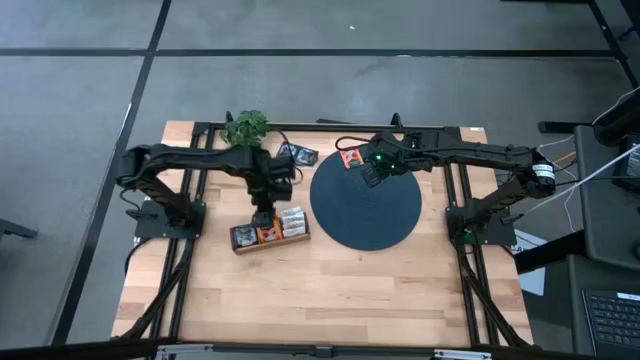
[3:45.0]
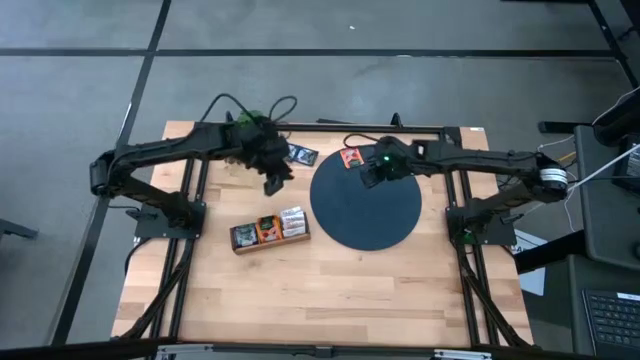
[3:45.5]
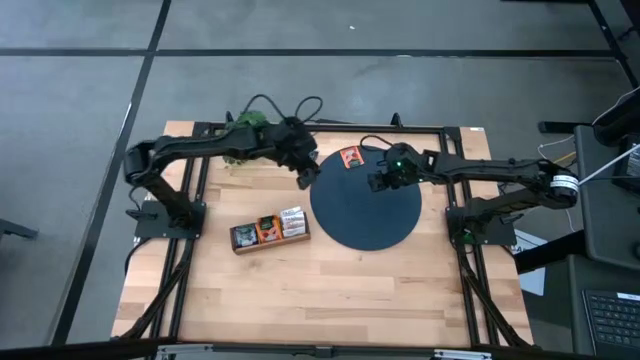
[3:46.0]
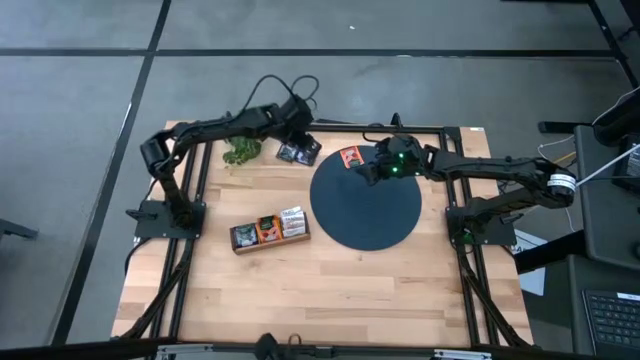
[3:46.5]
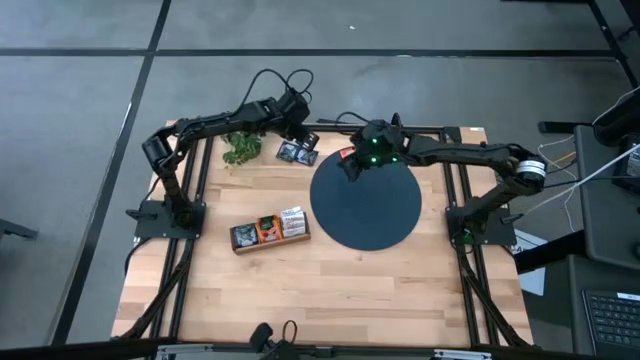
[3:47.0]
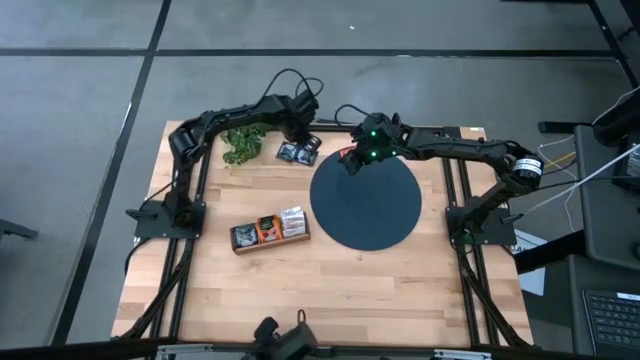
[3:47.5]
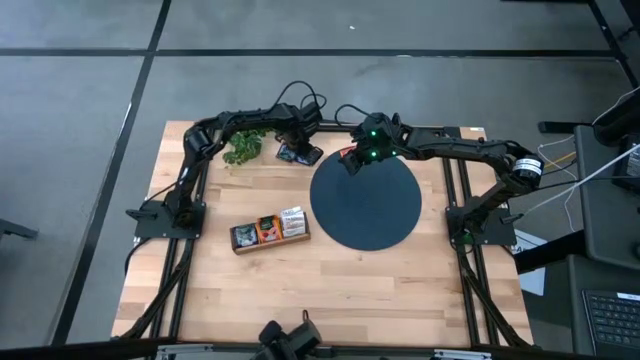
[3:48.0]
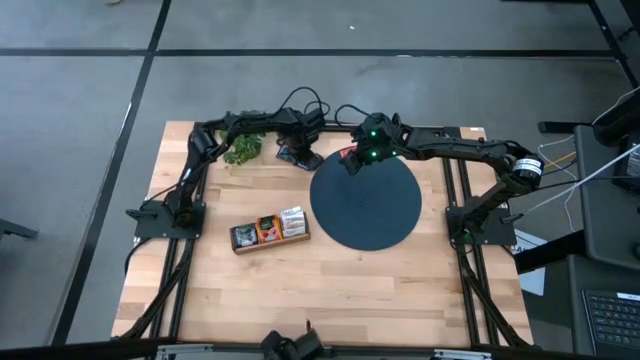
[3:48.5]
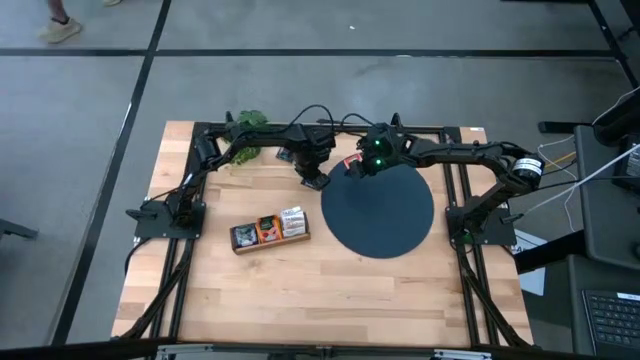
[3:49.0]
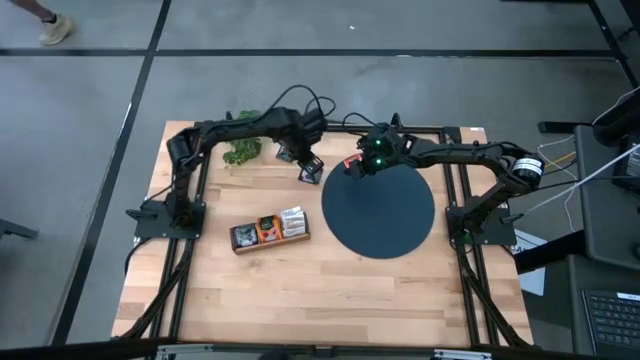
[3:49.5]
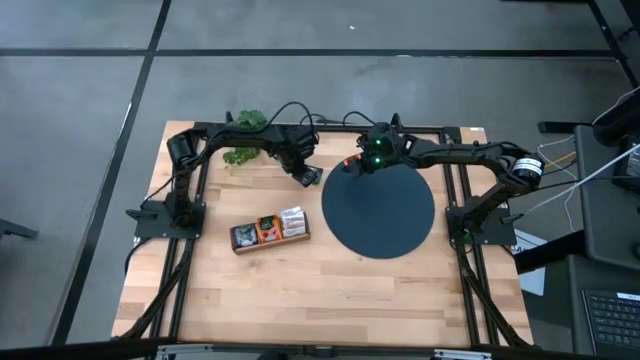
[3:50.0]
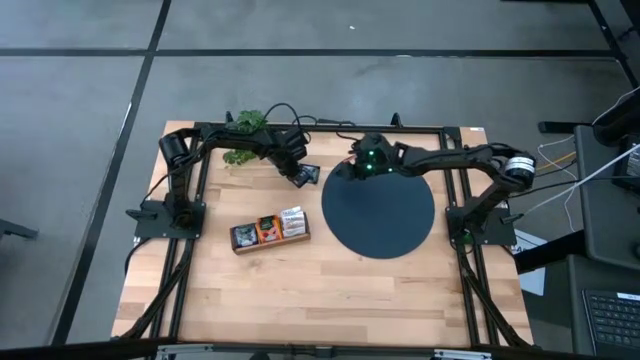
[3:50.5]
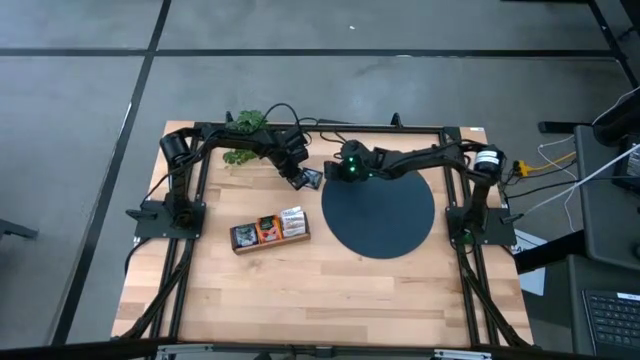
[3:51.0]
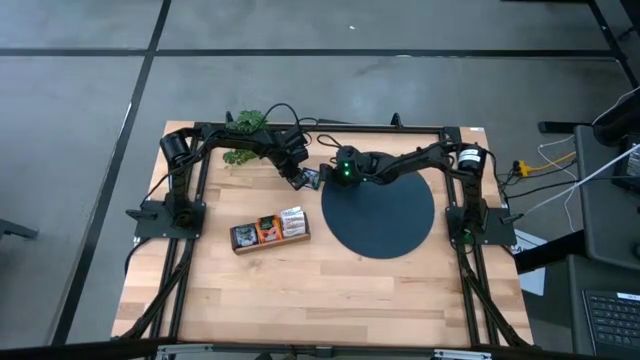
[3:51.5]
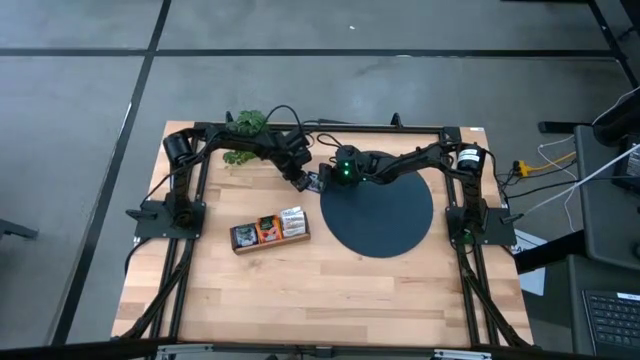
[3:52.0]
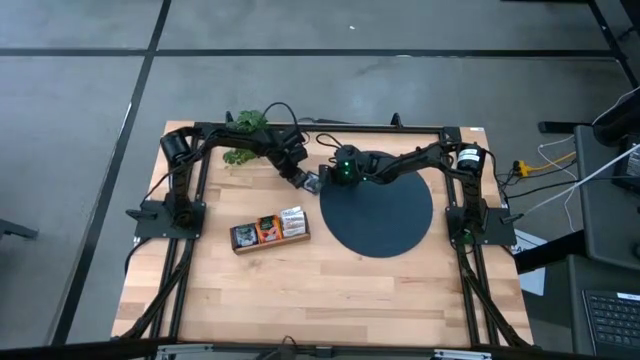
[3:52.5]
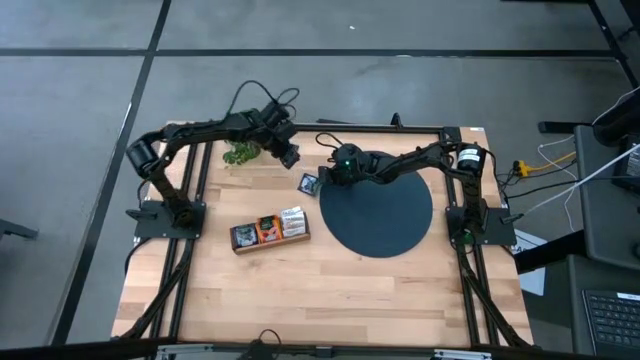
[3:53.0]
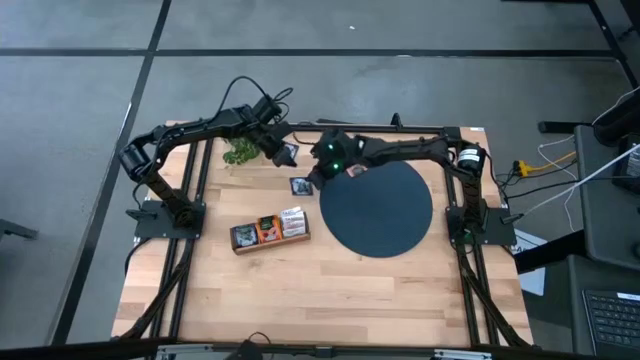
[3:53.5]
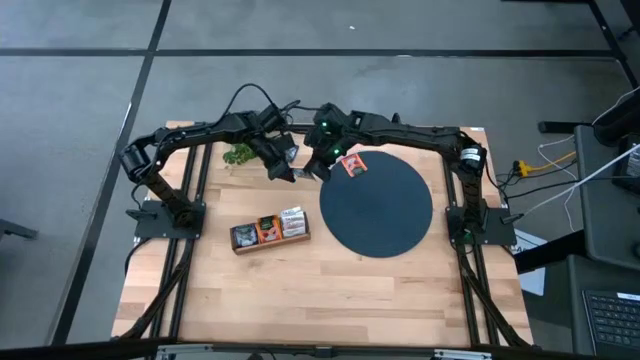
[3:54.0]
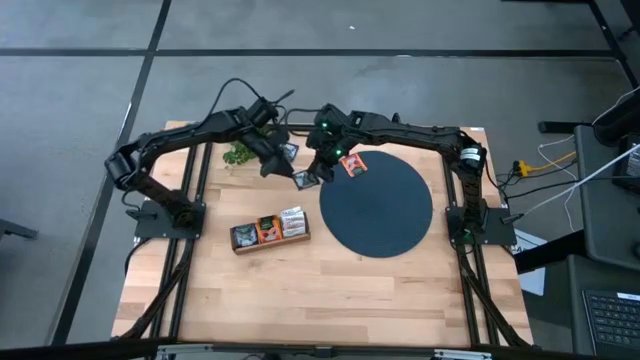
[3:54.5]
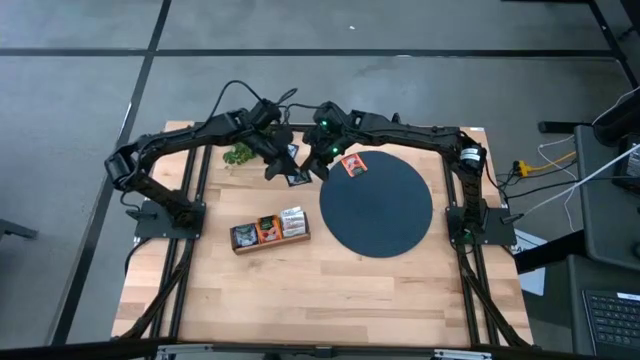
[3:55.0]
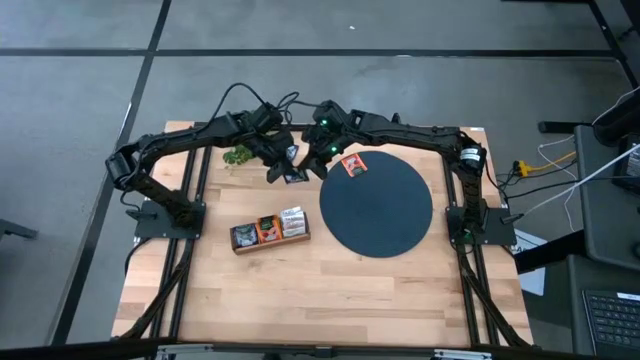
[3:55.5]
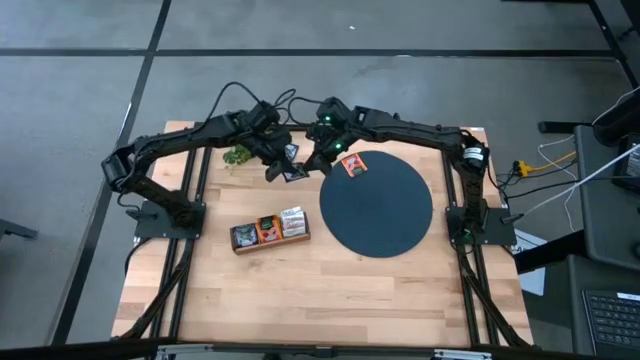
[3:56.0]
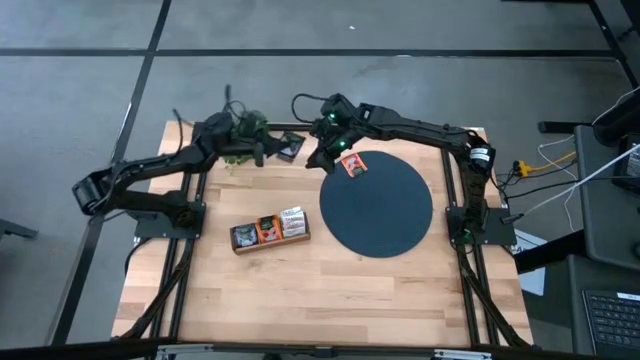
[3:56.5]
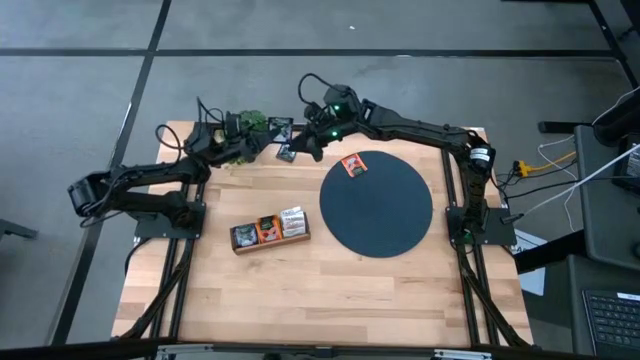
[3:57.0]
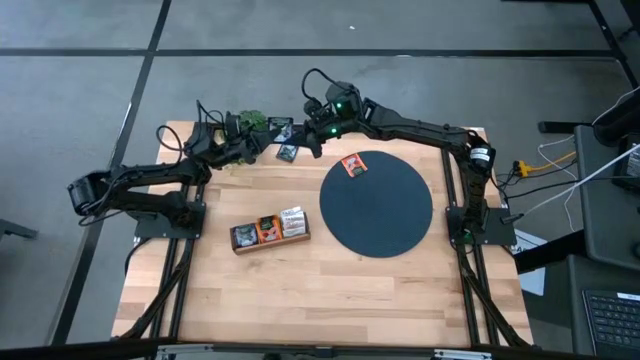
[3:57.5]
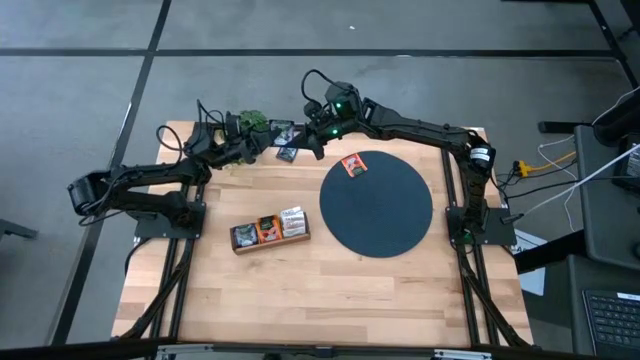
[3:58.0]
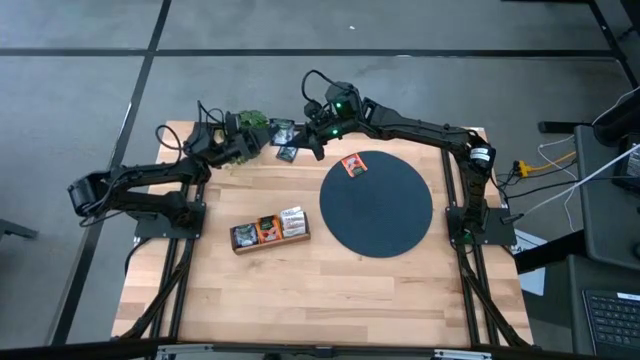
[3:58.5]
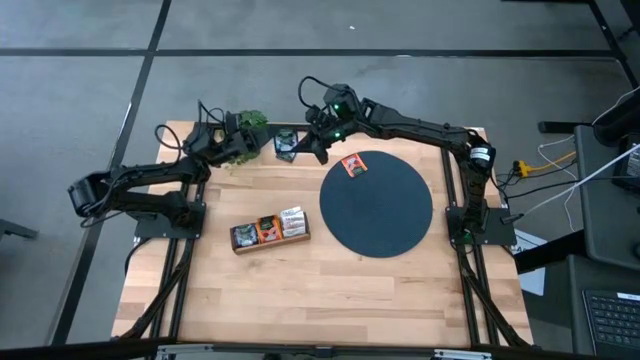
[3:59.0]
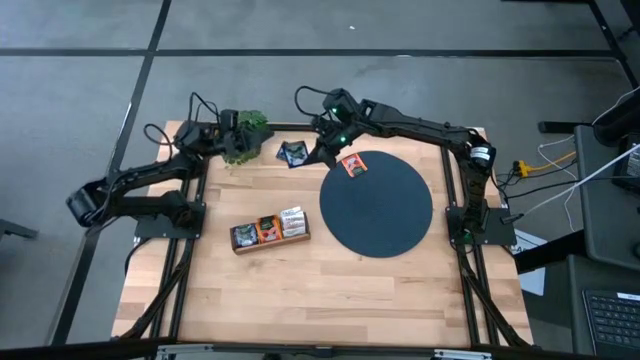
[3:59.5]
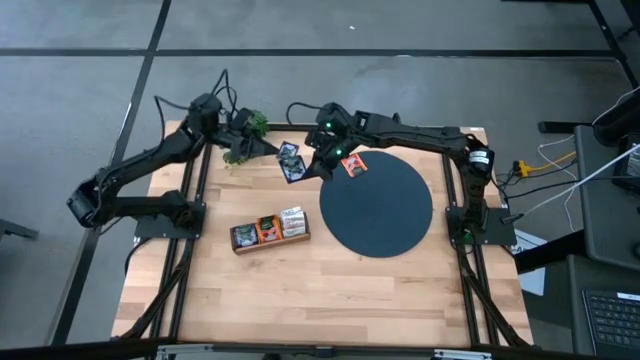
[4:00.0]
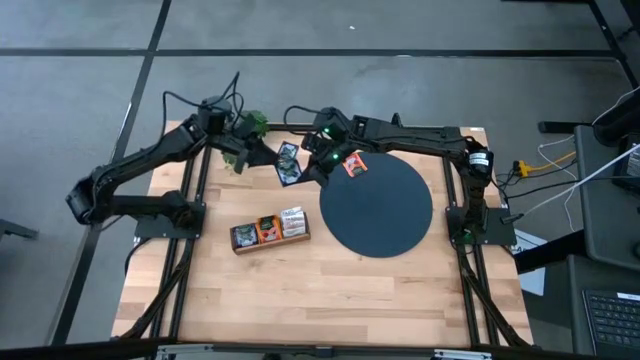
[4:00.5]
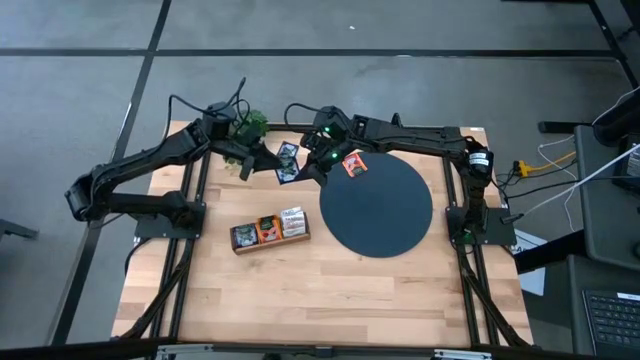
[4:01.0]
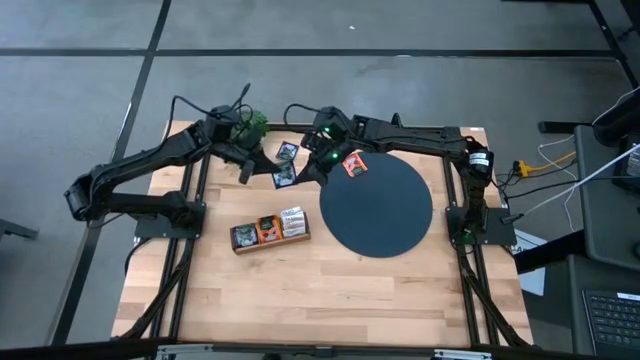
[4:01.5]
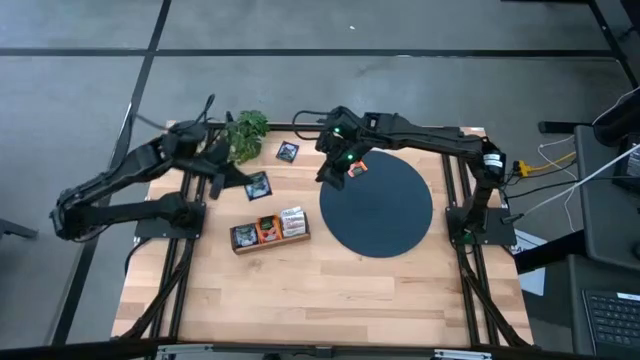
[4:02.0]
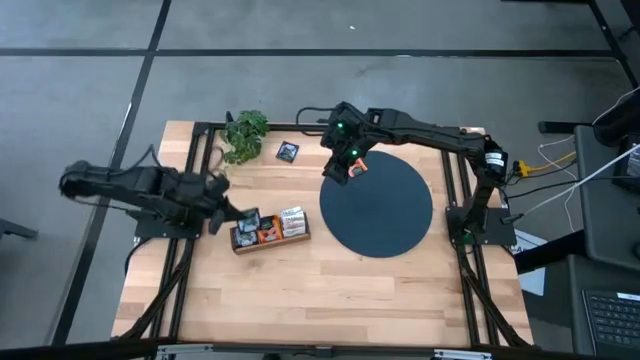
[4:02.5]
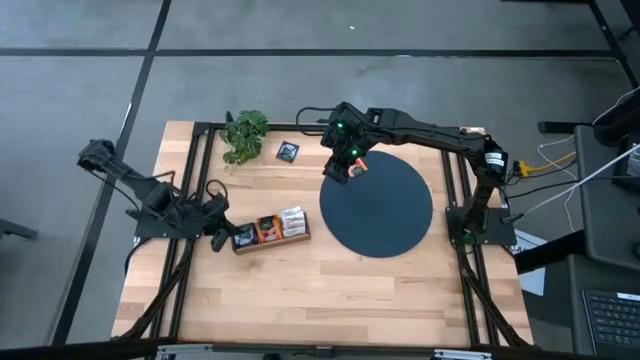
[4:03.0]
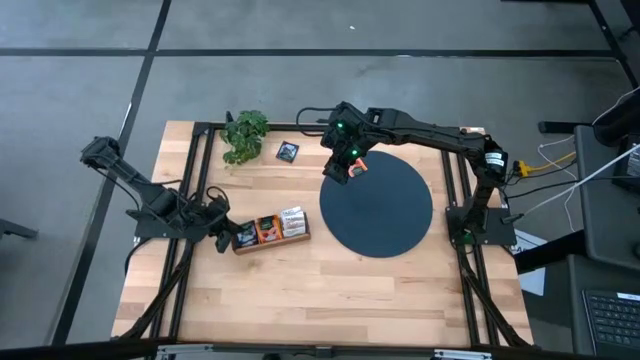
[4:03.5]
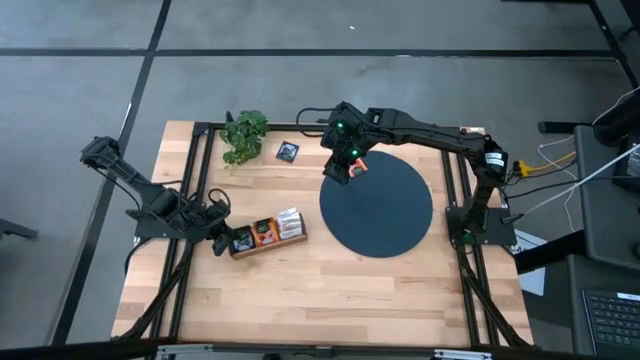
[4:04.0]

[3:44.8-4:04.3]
Task: Pick & Place Tea
Put the purple tea bag into the left section of the wooden organizer
